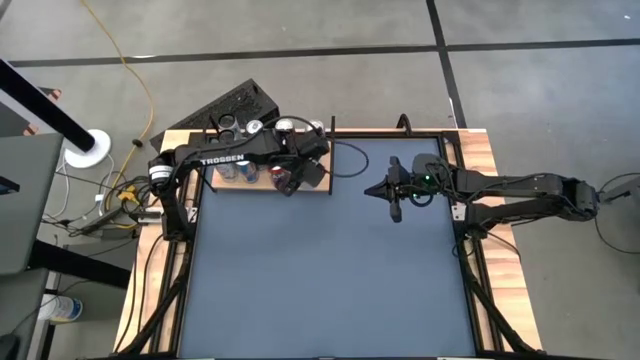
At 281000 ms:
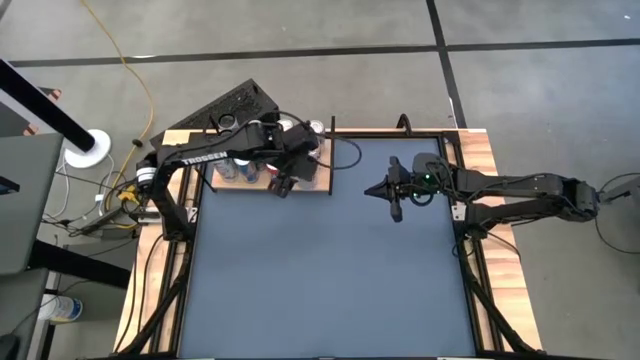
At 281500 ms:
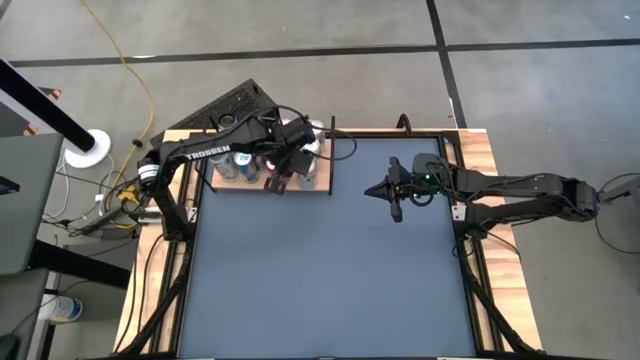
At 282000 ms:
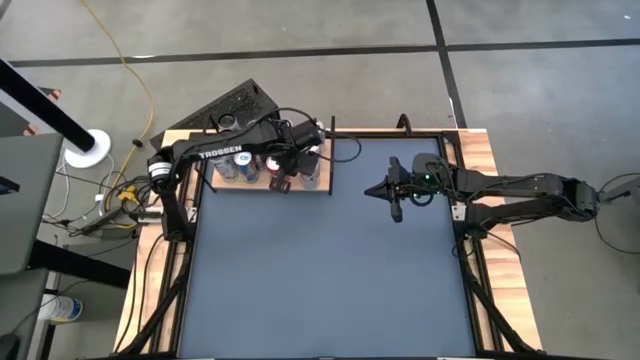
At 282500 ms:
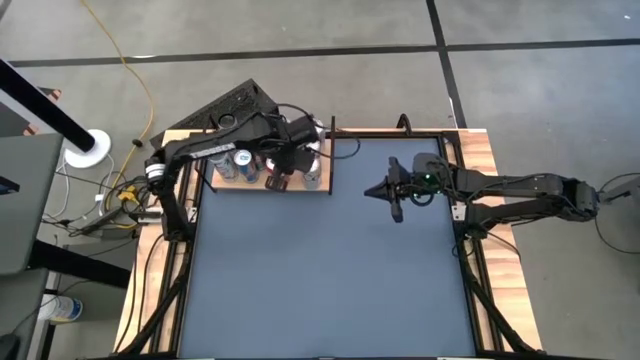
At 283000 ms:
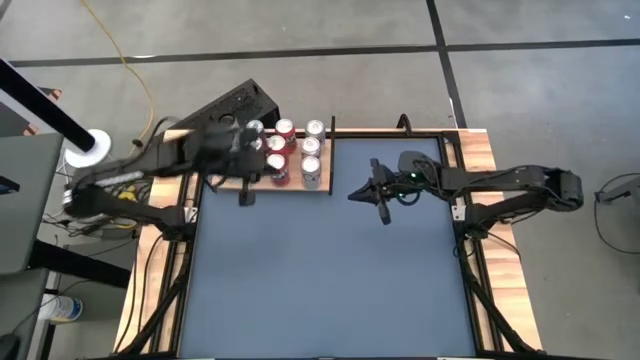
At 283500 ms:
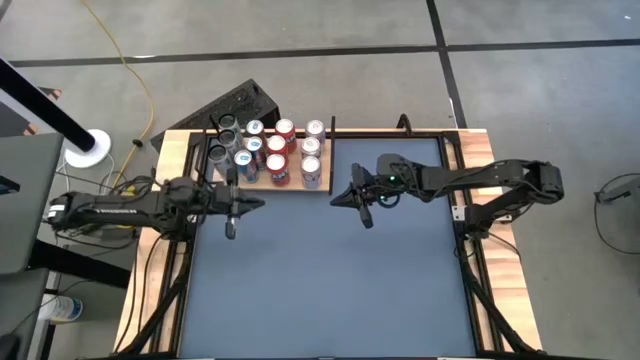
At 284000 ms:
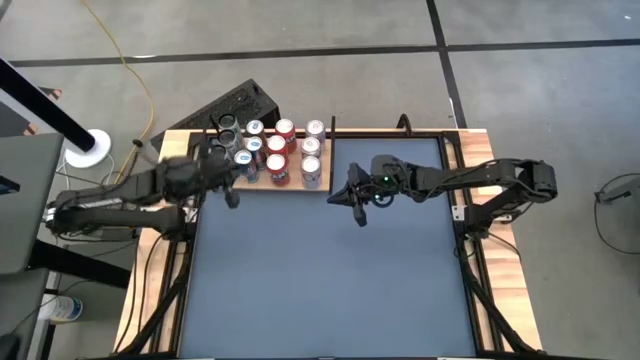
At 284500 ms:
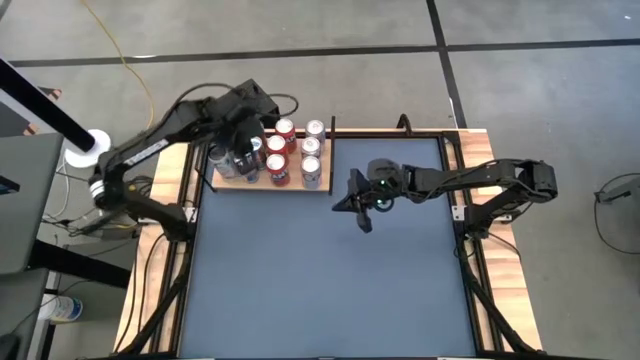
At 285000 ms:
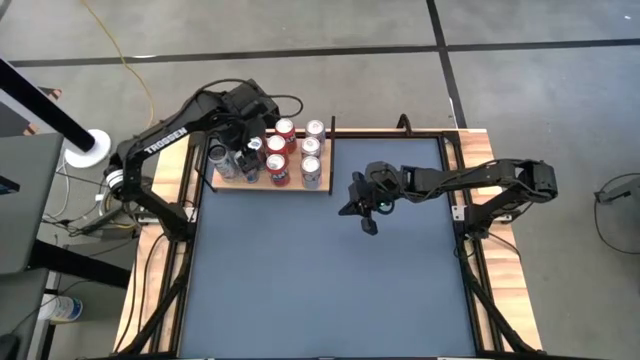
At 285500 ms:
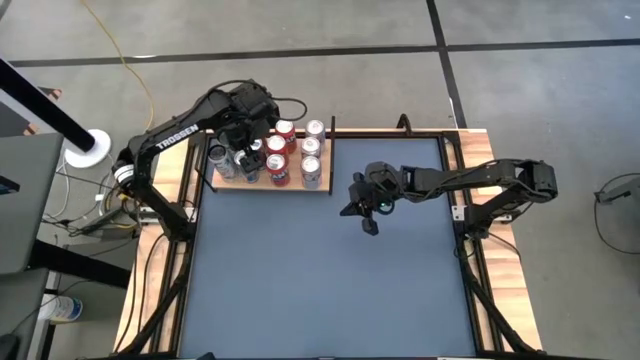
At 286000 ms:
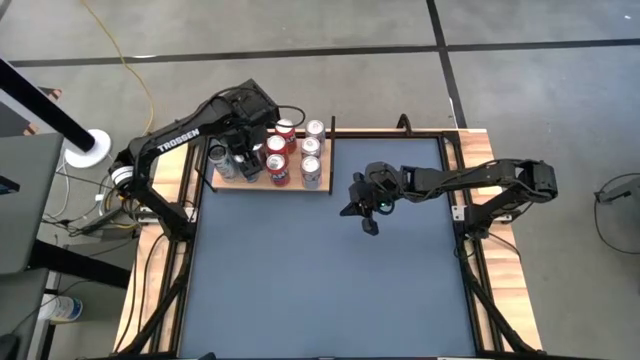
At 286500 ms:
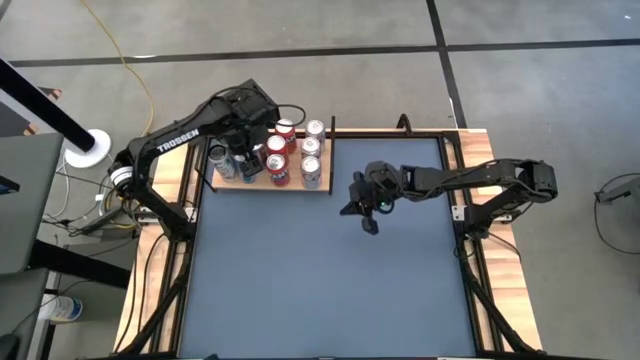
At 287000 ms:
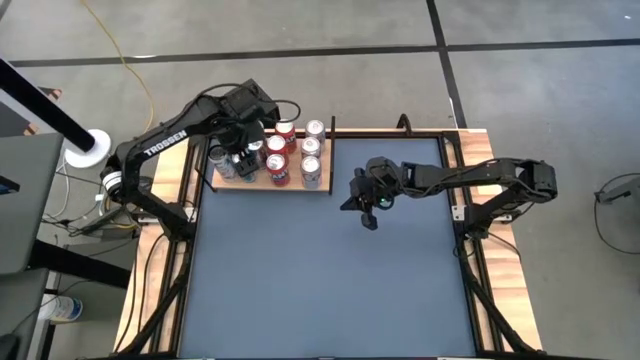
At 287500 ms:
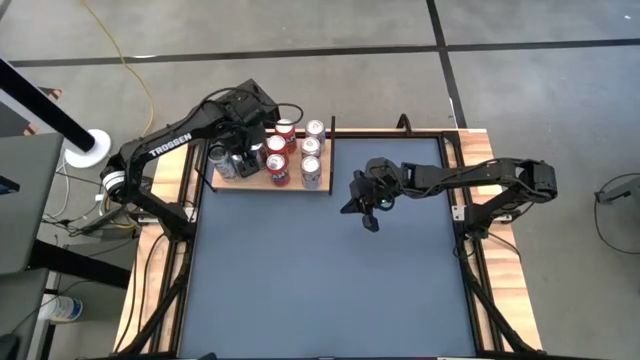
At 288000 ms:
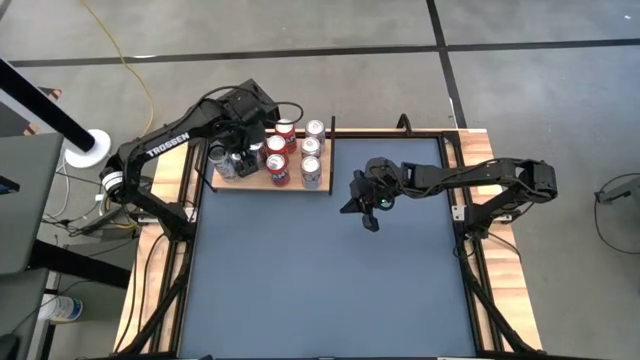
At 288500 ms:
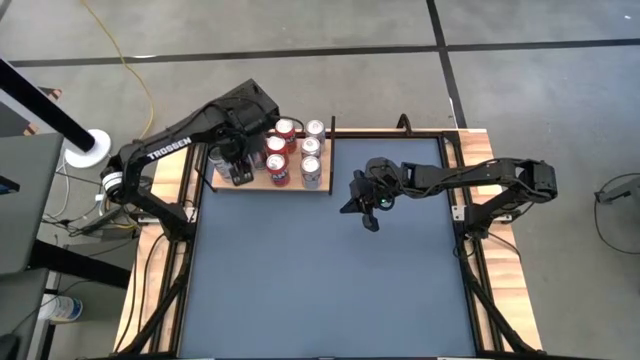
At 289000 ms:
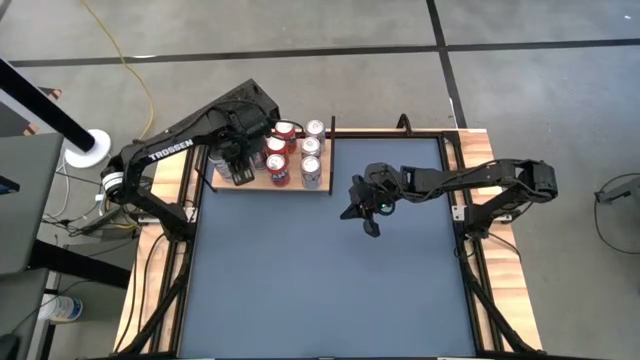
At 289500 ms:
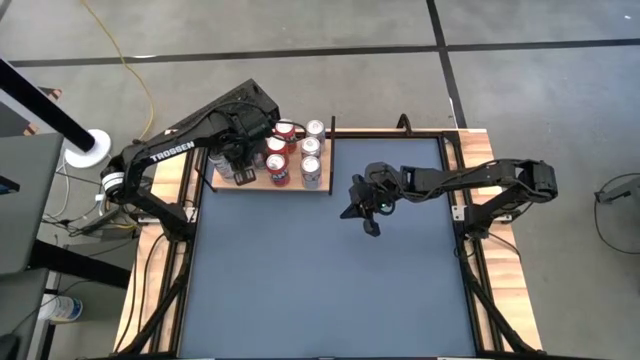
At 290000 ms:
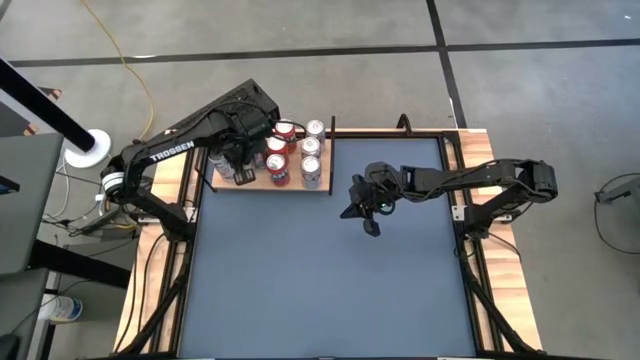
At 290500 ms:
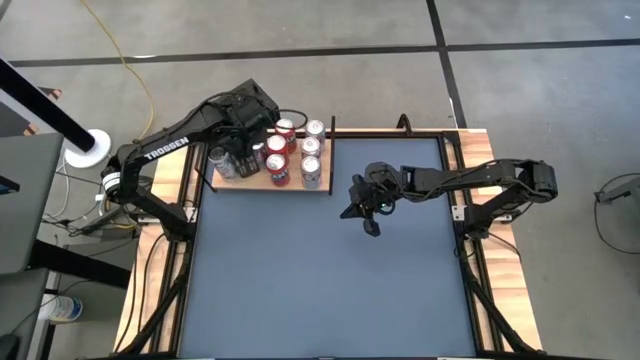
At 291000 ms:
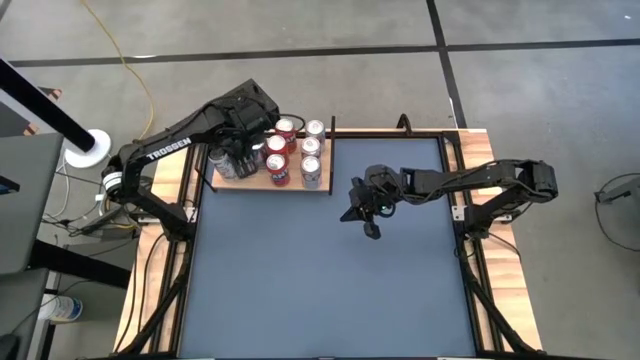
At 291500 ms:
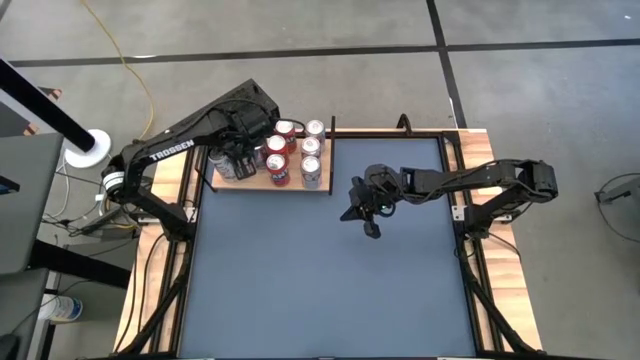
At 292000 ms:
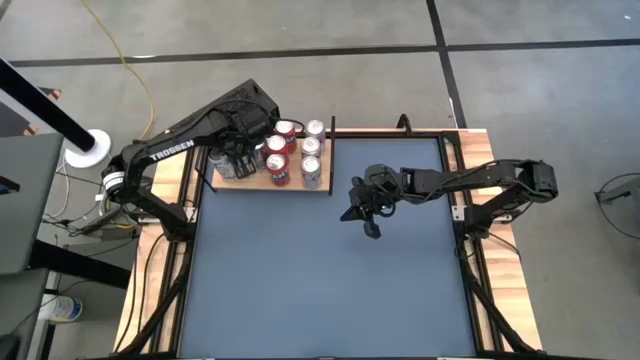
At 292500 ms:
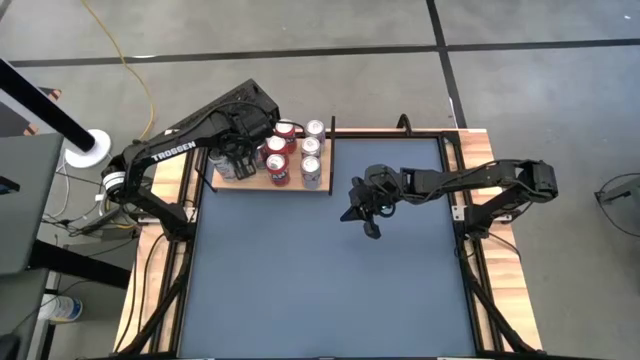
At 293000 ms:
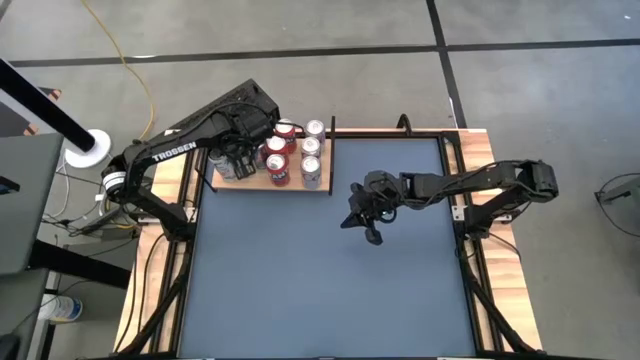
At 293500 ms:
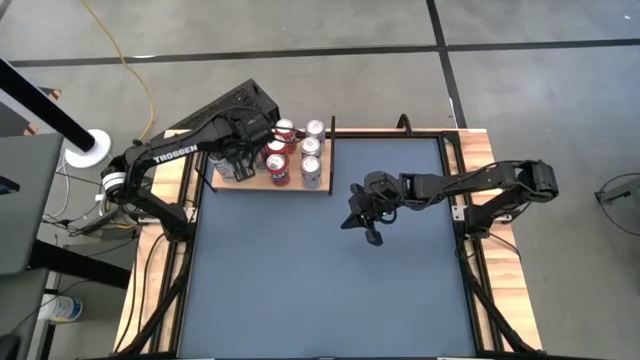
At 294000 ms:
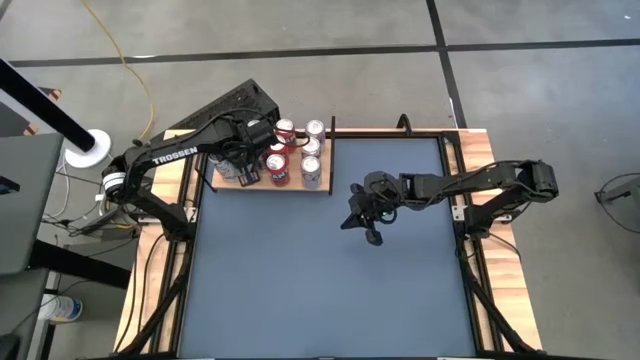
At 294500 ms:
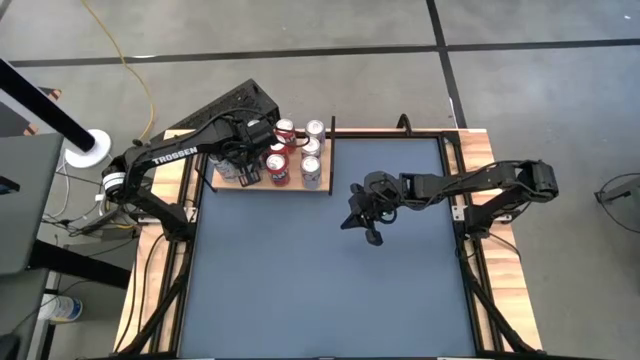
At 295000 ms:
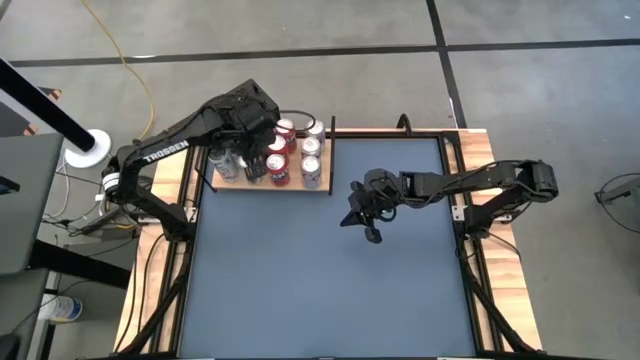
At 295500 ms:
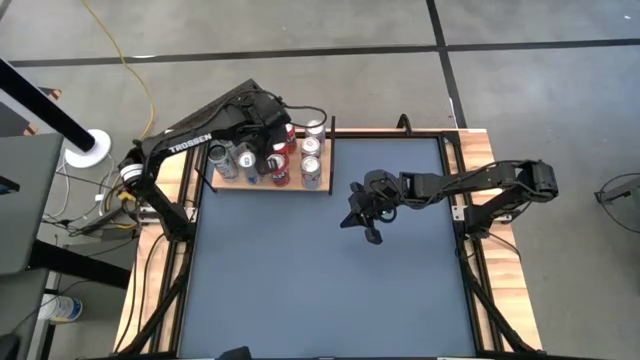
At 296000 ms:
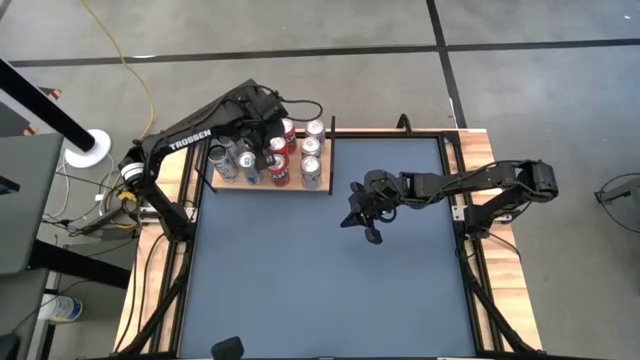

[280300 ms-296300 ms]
Task: Place canned beverage on shelf
Adjust the blue cans on the shelf

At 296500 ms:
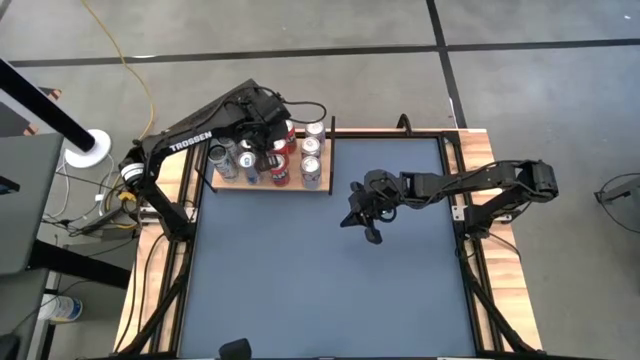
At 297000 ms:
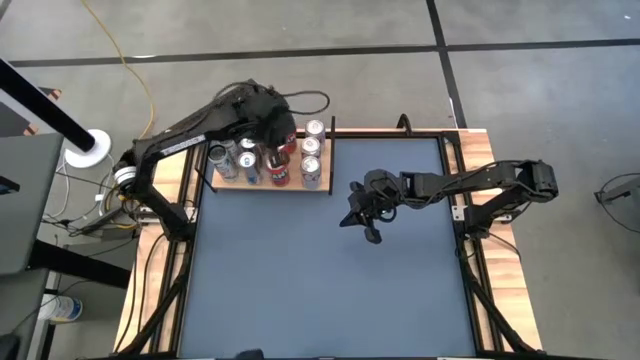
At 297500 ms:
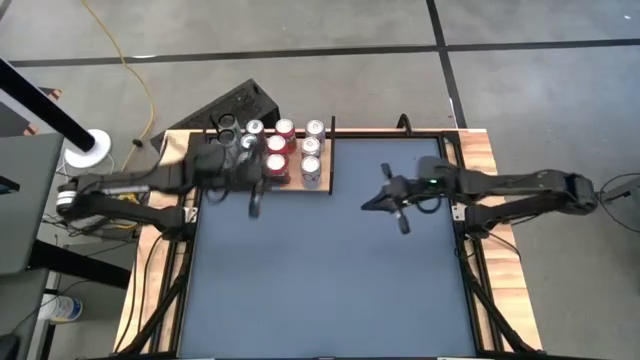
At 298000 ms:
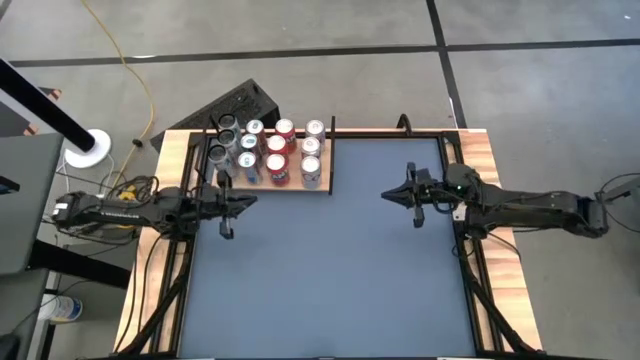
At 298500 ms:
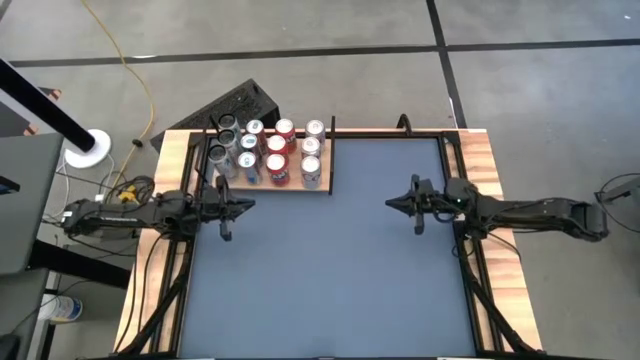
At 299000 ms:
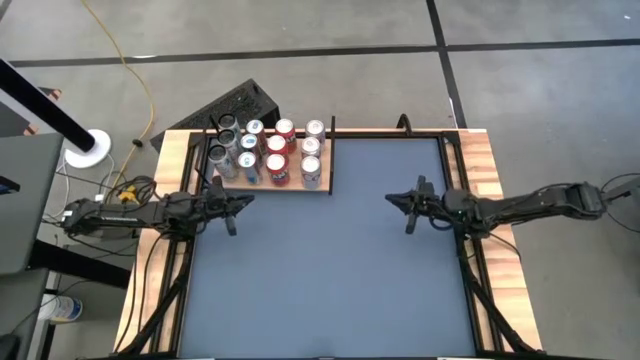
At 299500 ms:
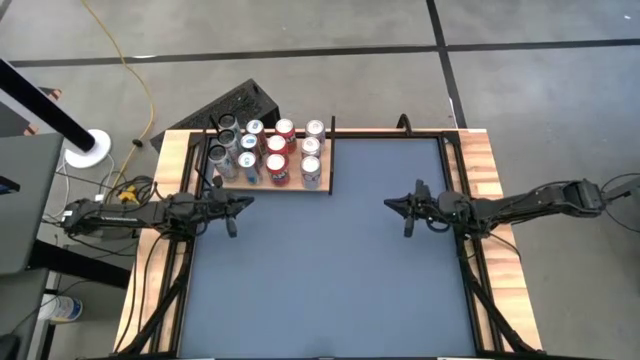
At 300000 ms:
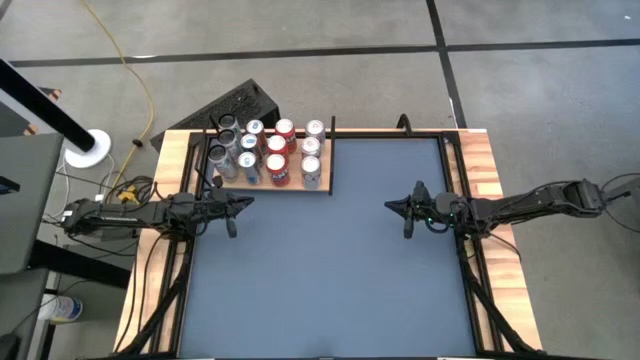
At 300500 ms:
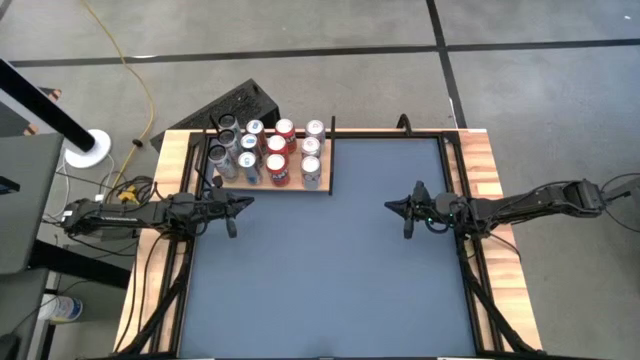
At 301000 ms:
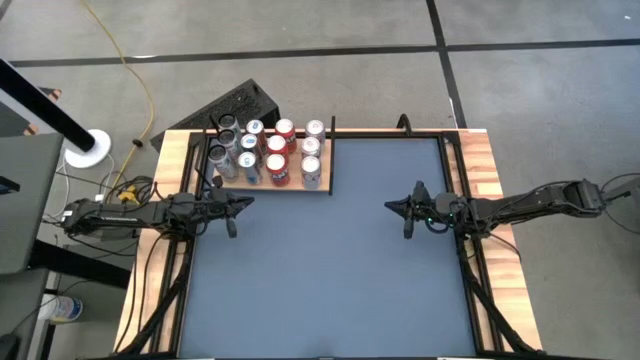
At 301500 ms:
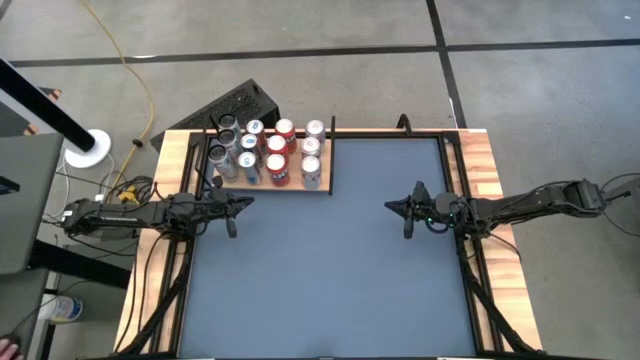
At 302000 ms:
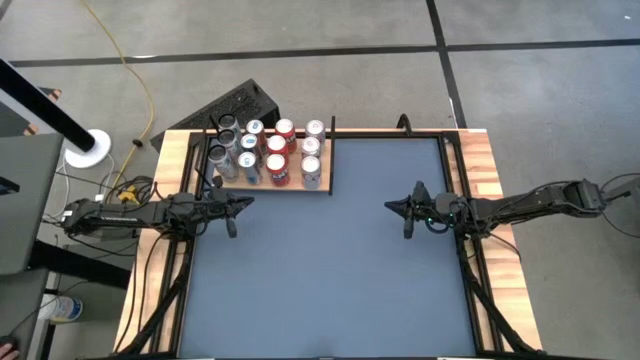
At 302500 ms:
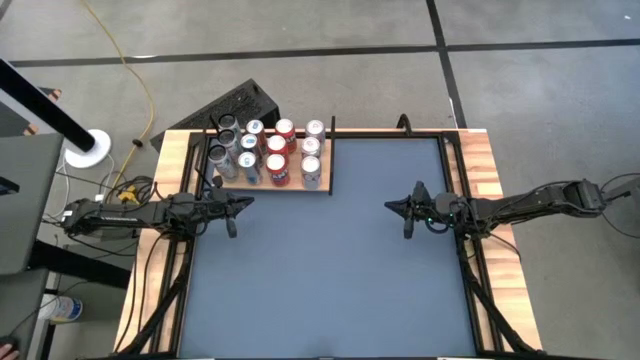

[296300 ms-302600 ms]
Return to Home Position
